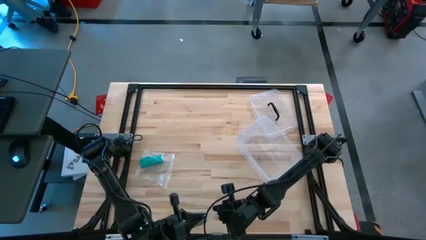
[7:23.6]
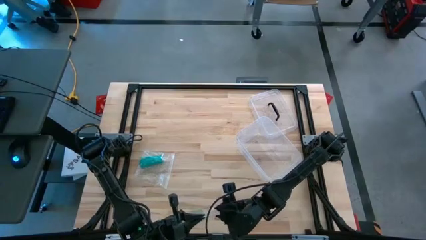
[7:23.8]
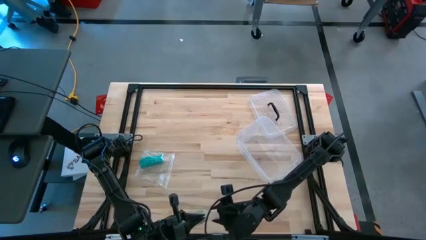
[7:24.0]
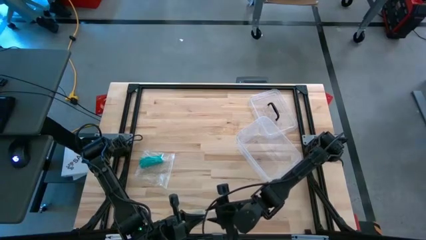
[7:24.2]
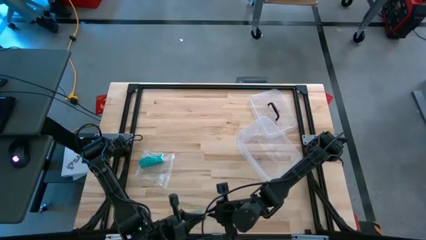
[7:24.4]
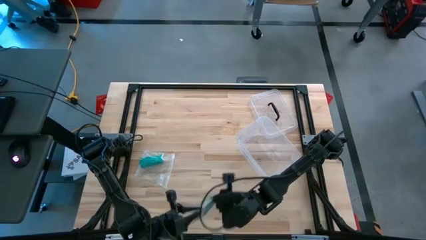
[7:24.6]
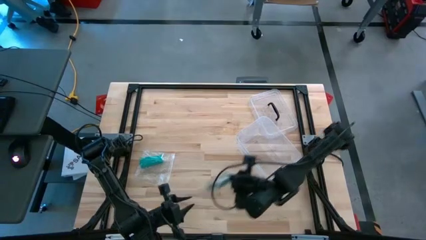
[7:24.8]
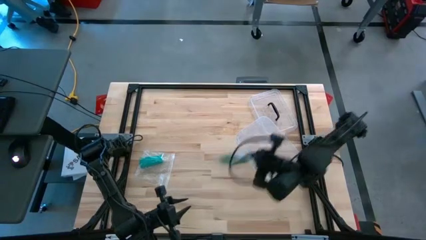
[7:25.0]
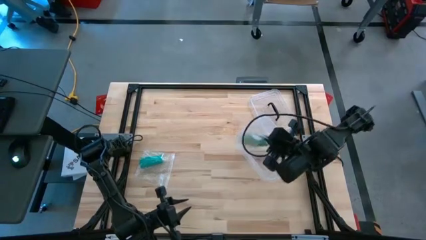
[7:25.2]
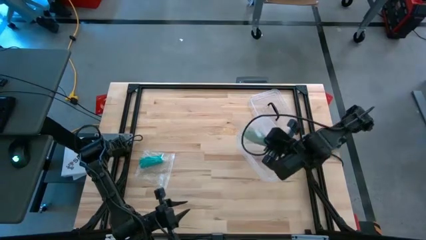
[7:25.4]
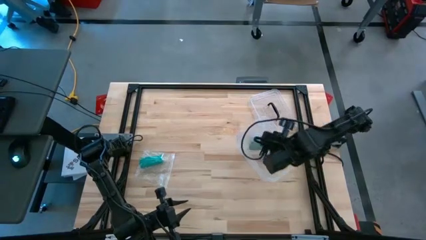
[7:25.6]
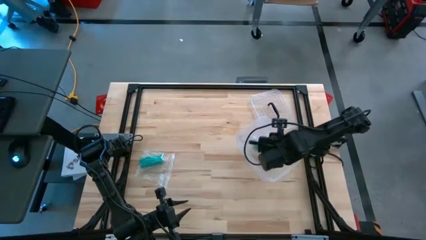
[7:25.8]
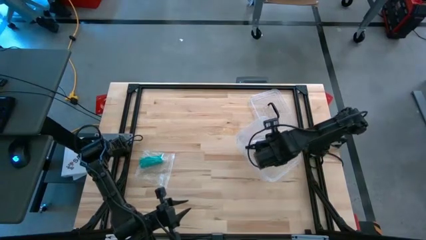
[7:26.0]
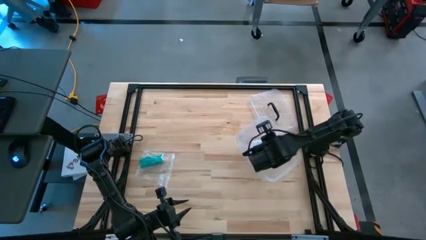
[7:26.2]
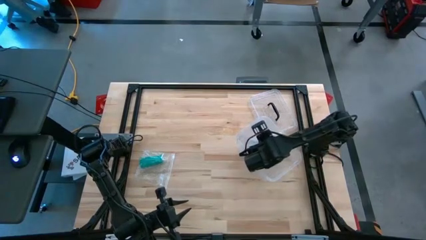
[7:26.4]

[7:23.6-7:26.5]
Task: Roll bandage
Put the packed green bandage into the transparent bin

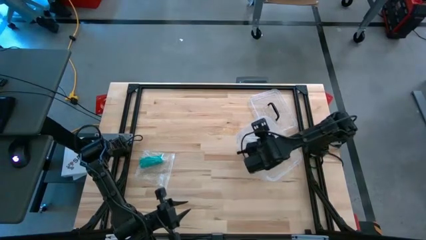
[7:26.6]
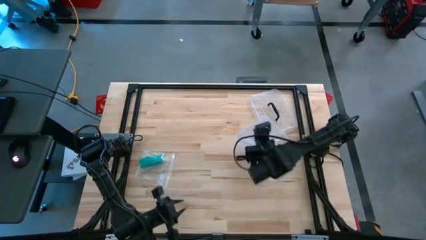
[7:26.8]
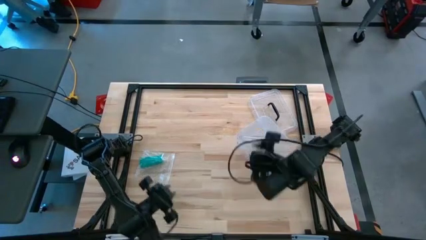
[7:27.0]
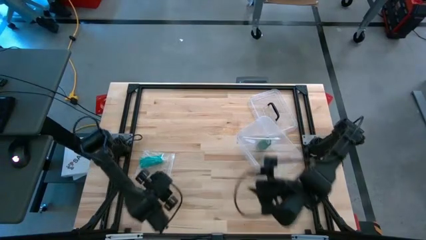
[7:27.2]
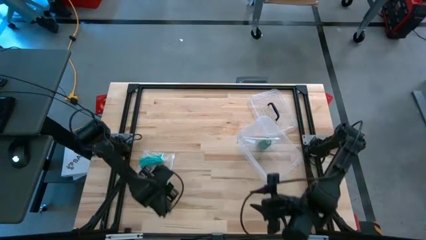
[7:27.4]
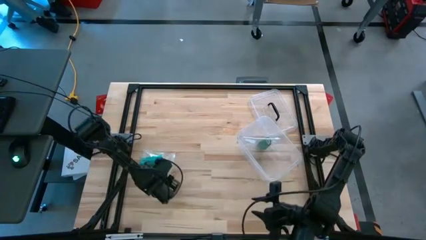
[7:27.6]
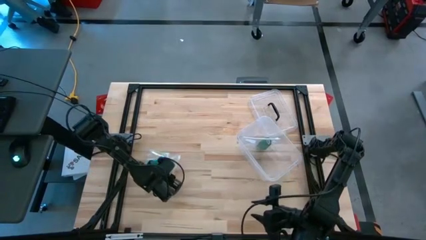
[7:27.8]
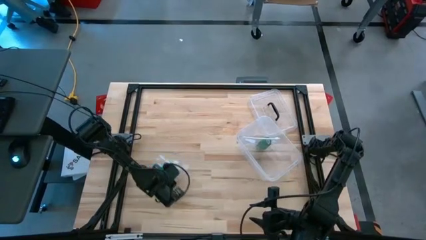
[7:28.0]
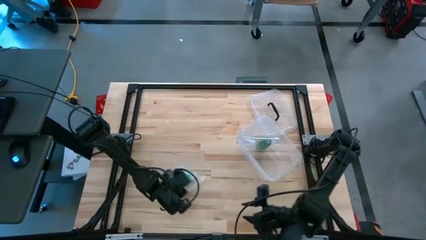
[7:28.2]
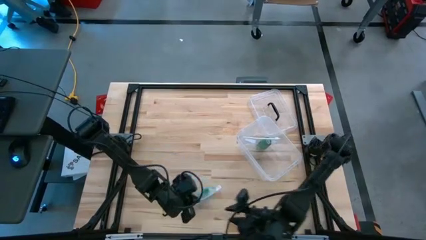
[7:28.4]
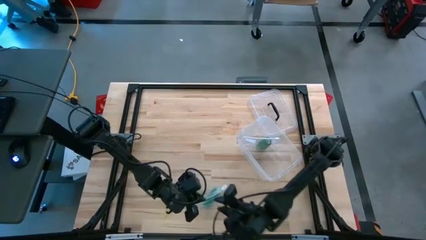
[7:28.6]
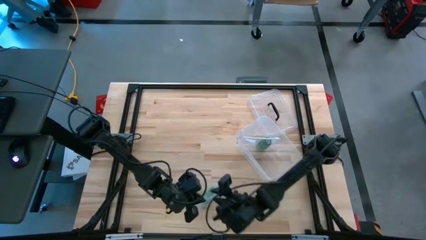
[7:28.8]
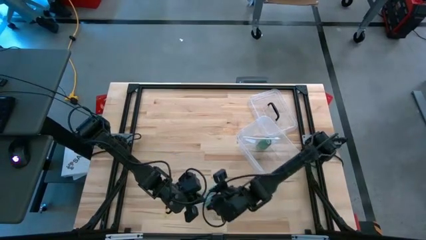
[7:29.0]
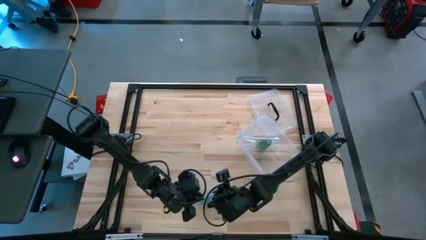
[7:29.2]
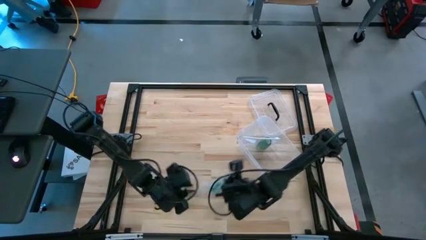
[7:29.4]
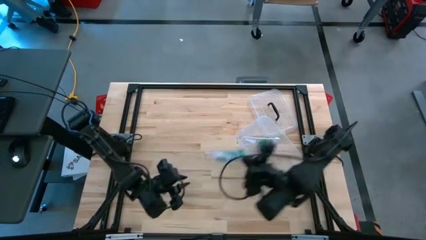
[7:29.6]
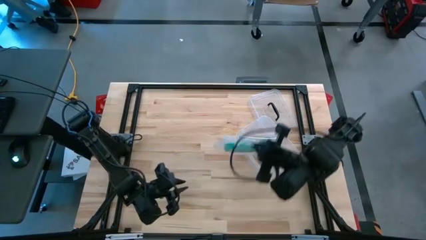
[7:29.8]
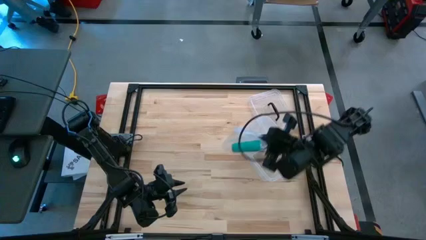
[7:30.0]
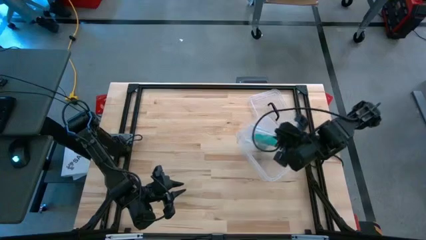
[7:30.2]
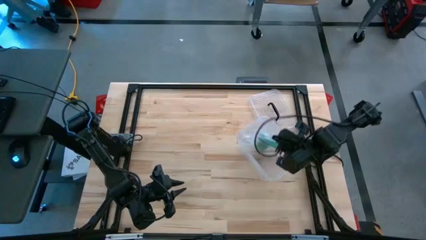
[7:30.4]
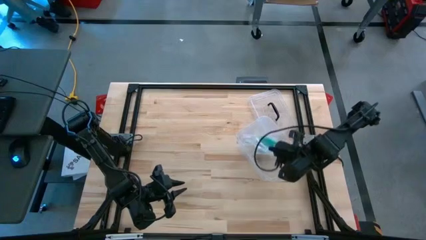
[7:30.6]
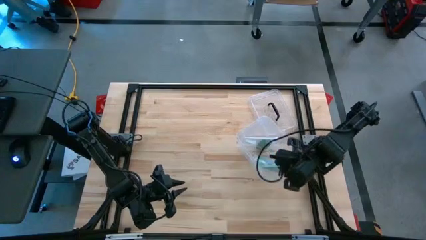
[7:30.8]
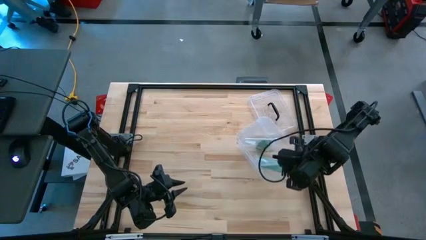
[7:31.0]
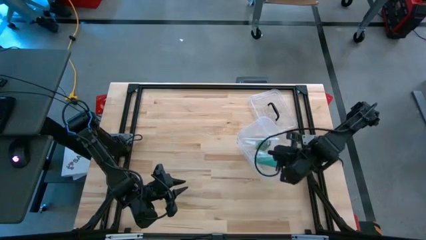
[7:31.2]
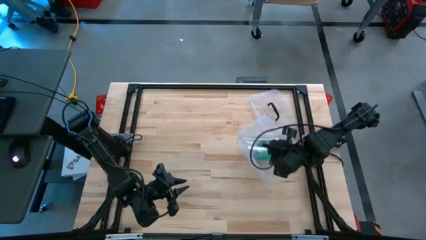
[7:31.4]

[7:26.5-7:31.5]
Put the packed blue bandage into the transparent bin

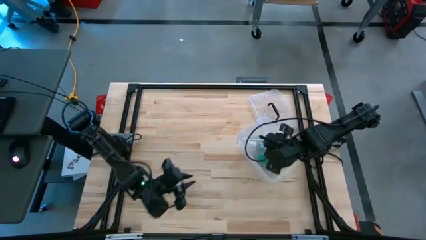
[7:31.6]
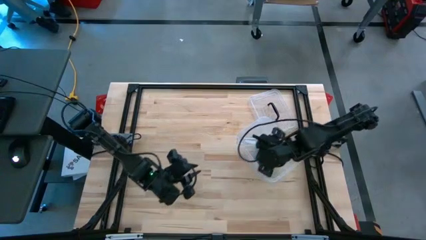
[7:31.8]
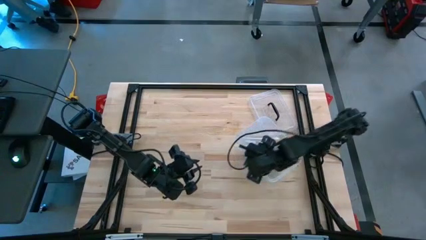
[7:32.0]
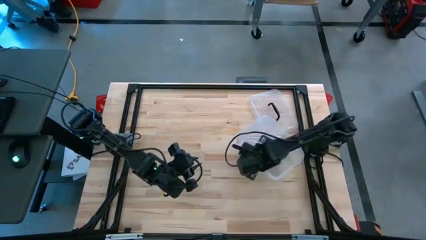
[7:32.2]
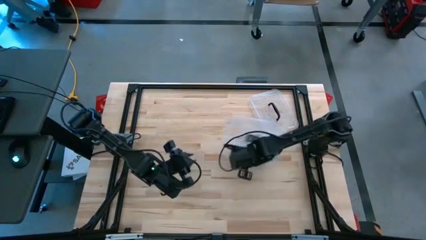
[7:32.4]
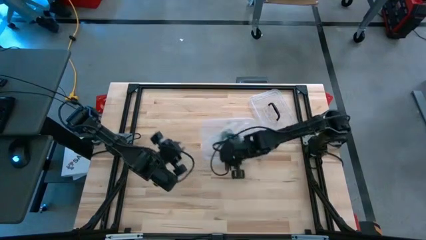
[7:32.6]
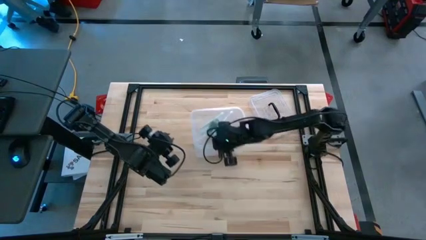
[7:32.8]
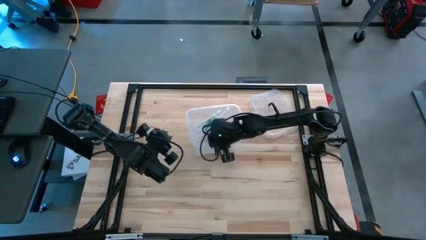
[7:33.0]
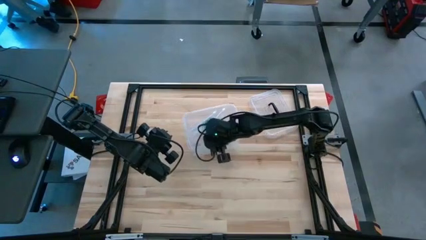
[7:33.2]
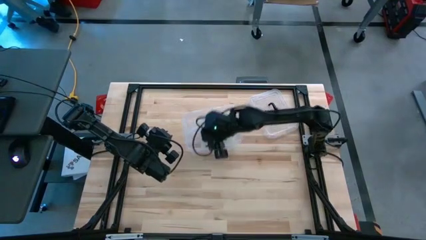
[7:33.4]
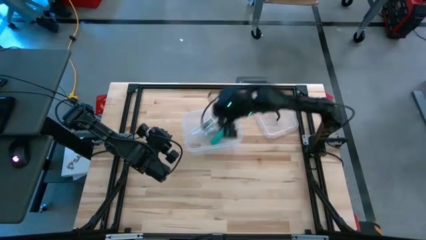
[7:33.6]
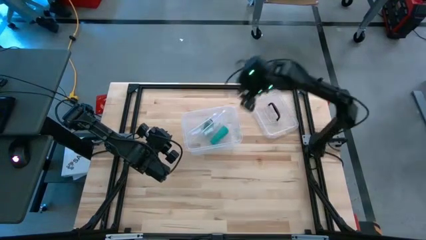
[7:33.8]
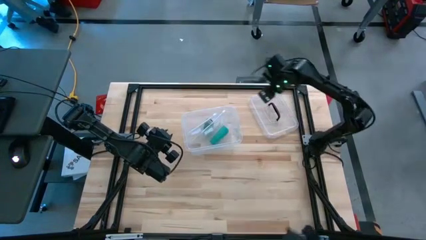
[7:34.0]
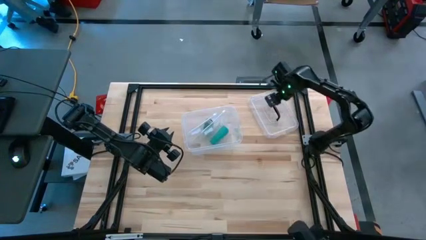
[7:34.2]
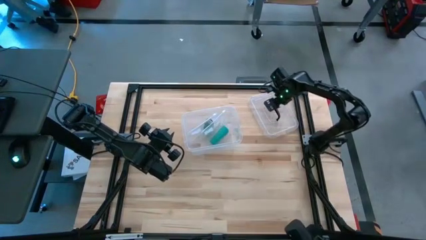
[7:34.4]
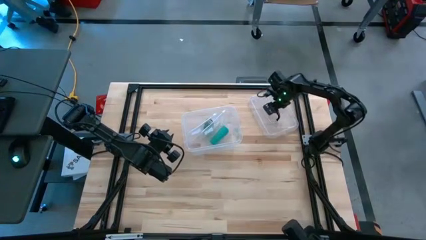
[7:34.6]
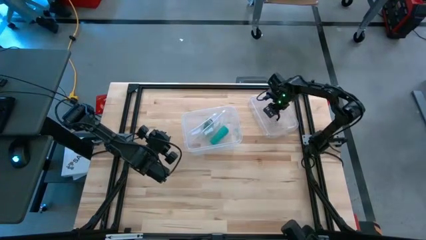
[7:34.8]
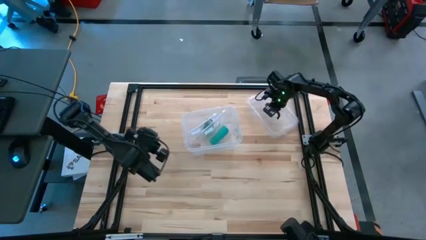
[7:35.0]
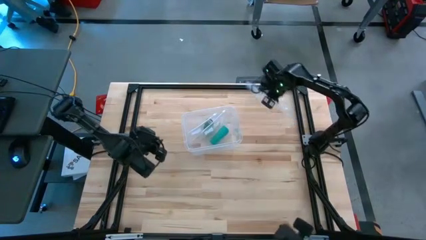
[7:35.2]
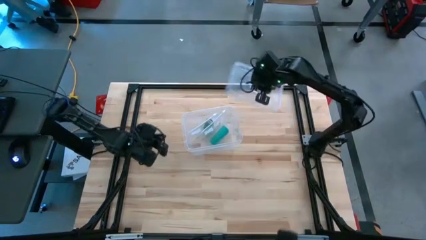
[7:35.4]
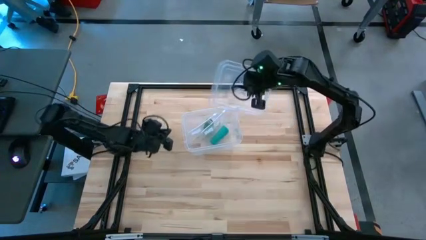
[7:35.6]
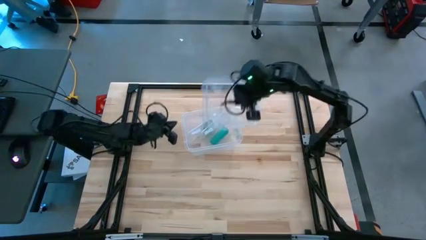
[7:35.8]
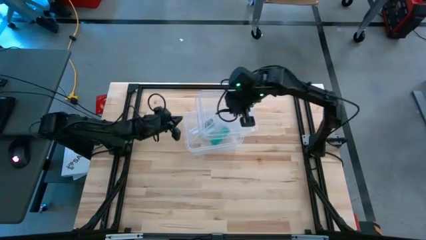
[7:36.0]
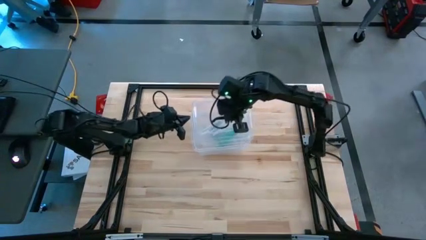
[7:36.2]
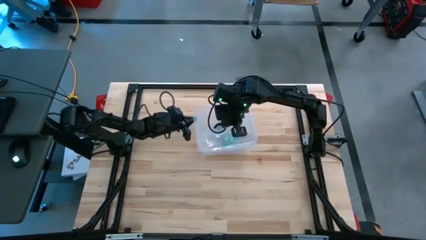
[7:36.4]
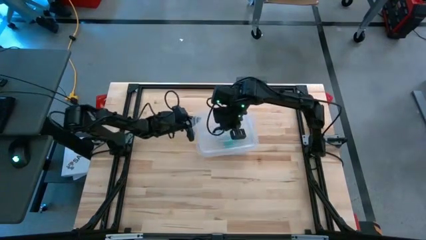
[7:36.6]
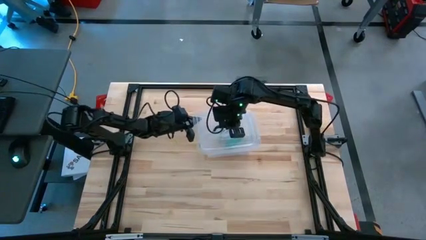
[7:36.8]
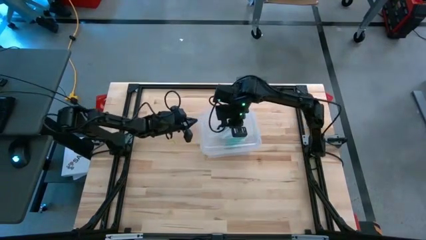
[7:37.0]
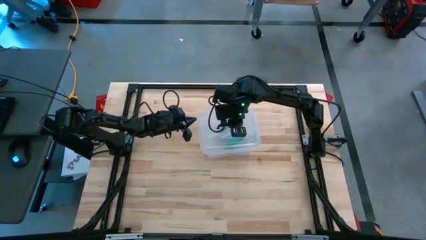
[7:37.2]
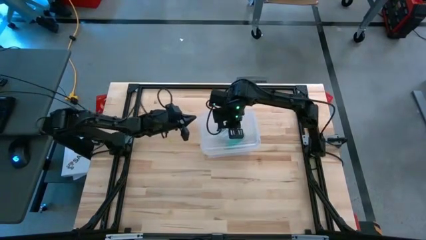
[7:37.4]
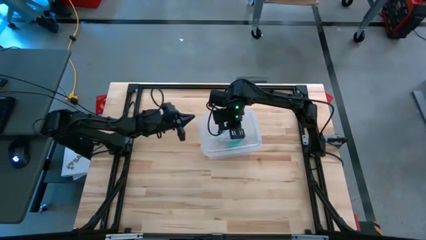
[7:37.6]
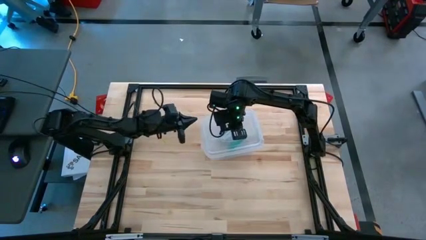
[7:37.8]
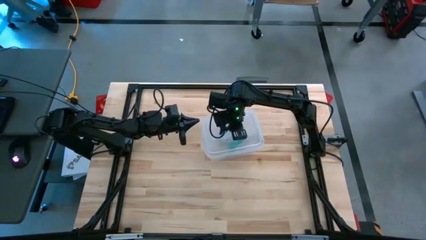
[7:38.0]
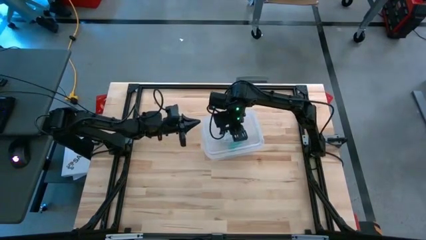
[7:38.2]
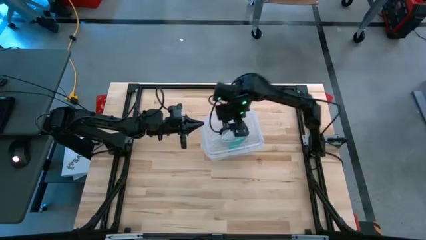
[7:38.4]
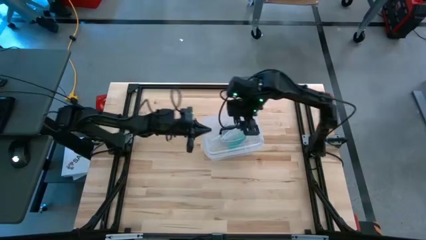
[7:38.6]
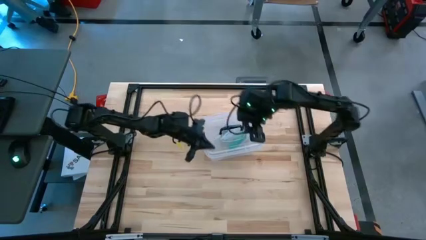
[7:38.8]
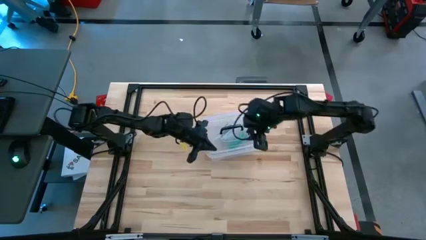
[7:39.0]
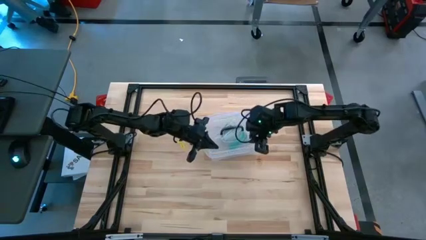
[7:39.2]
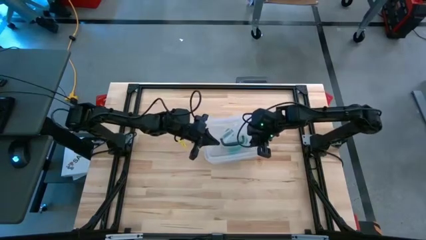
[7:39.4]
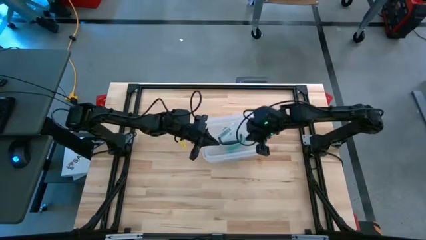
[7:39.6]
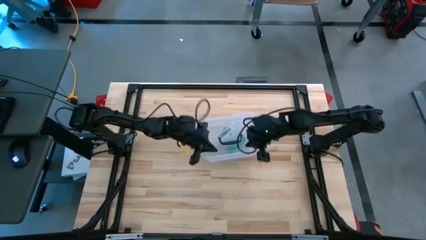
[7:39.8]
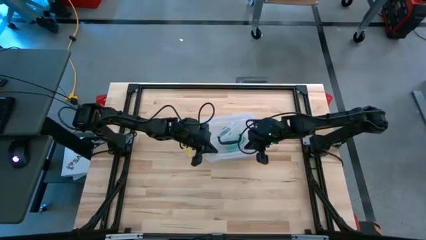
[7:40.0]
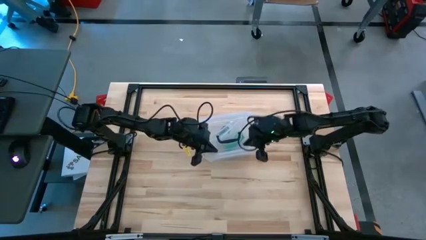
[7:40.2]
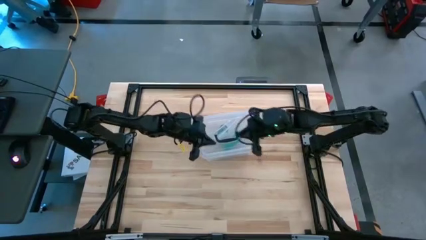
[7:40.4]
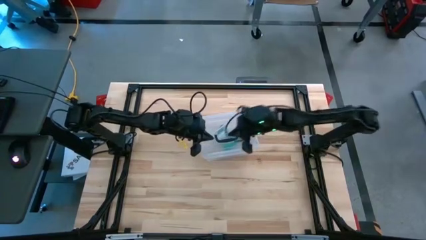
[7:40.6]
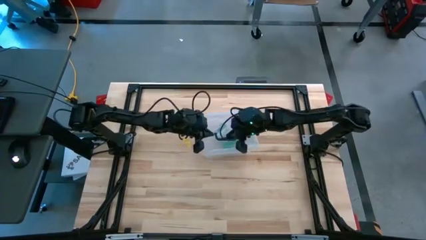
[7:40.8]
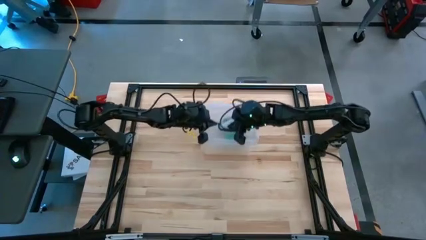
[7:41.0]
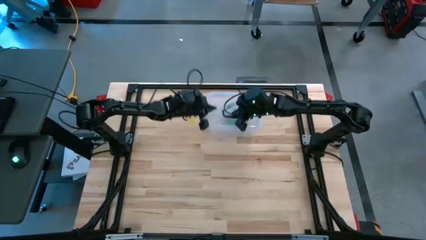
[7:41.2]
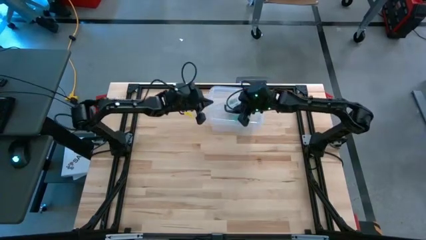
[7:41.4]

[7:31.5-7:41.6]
Close the transparent bin
